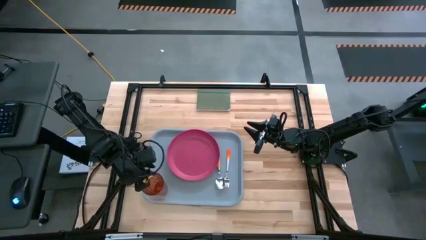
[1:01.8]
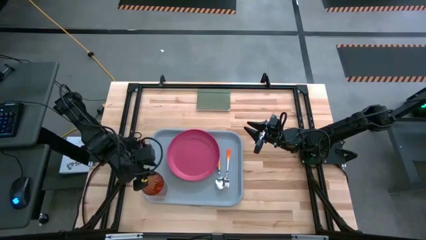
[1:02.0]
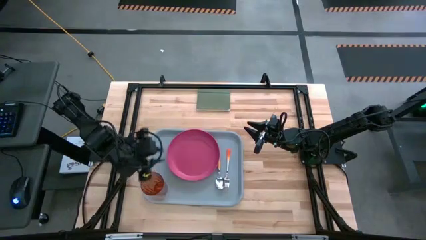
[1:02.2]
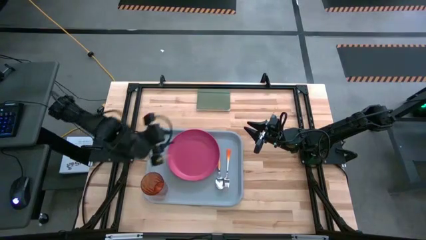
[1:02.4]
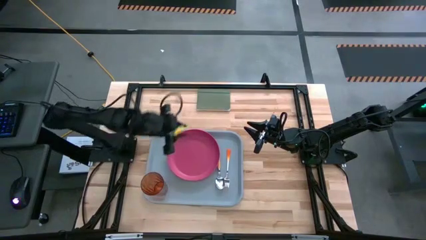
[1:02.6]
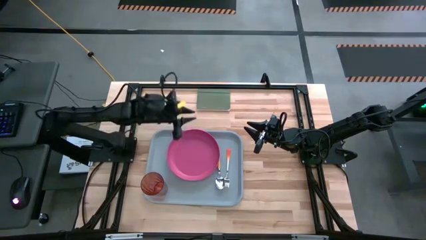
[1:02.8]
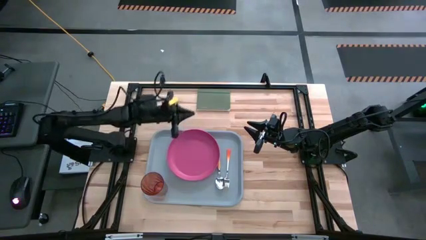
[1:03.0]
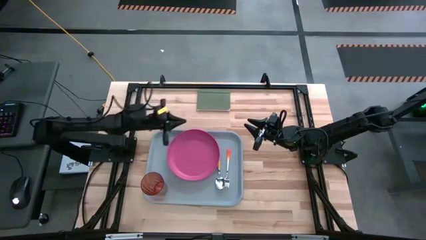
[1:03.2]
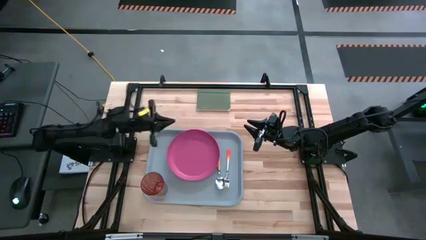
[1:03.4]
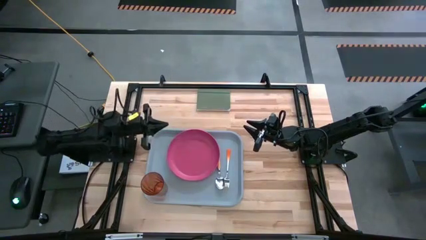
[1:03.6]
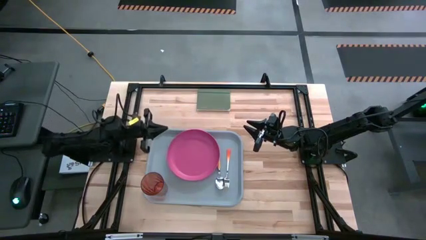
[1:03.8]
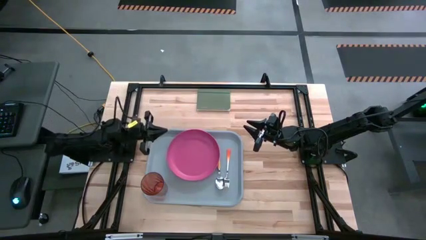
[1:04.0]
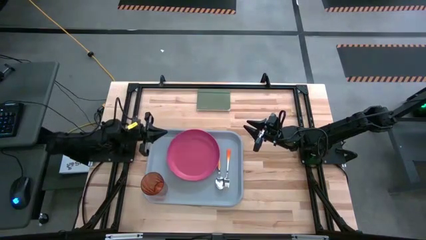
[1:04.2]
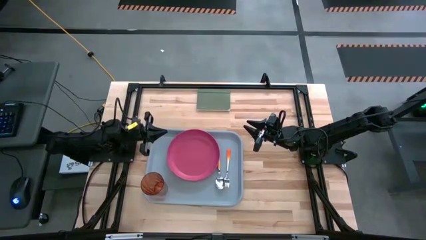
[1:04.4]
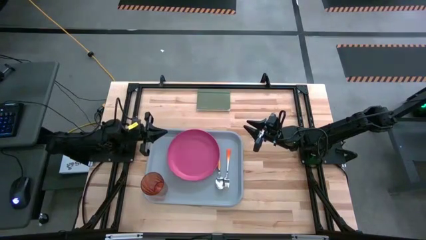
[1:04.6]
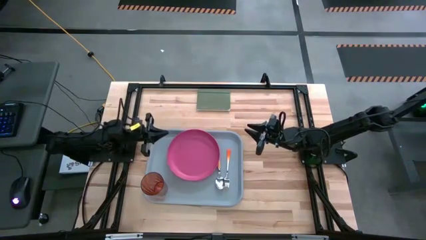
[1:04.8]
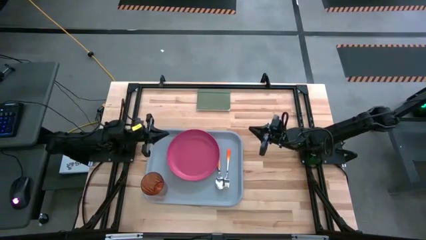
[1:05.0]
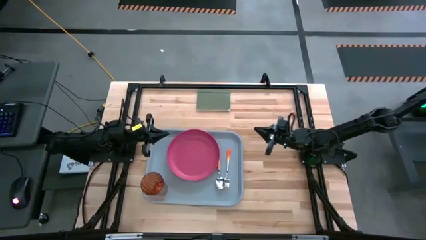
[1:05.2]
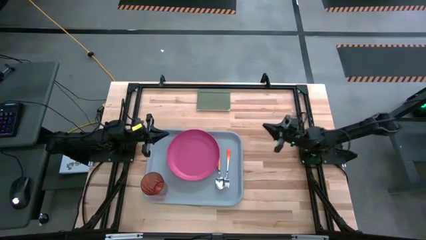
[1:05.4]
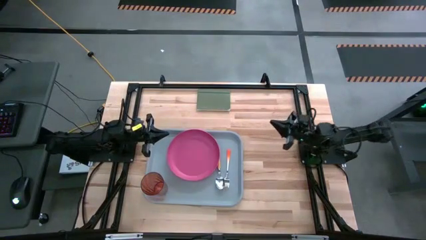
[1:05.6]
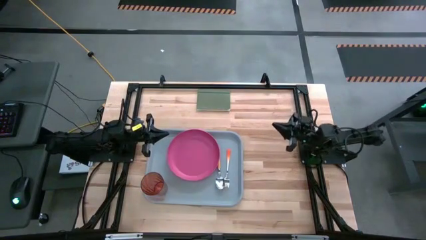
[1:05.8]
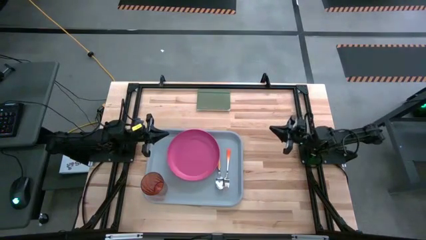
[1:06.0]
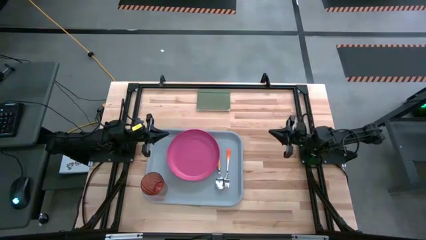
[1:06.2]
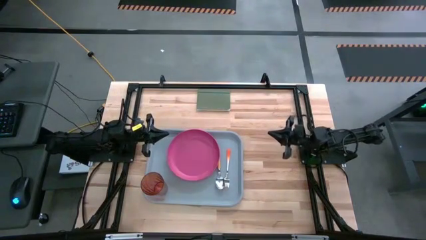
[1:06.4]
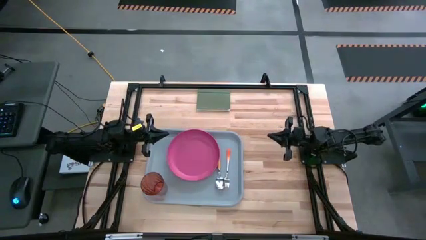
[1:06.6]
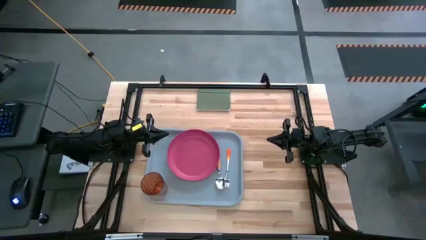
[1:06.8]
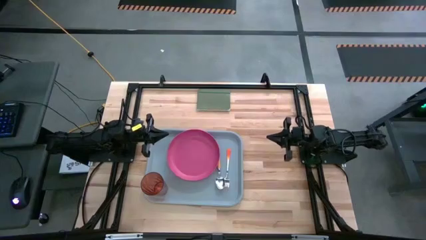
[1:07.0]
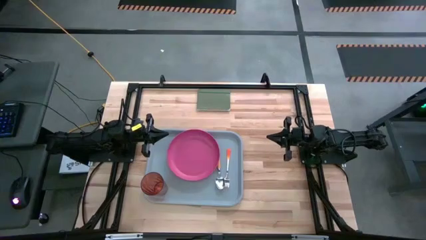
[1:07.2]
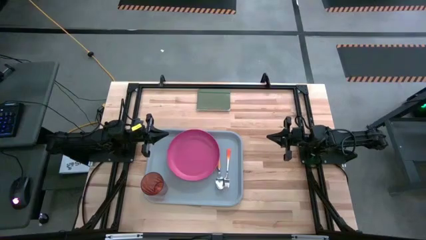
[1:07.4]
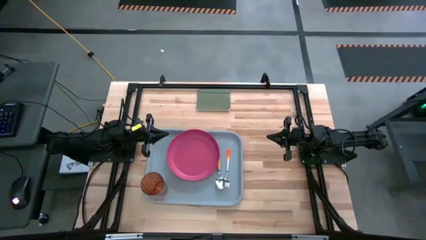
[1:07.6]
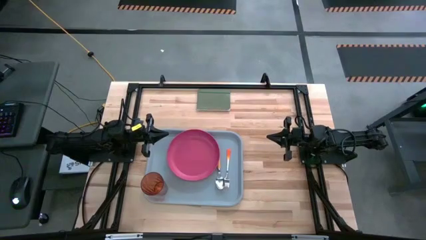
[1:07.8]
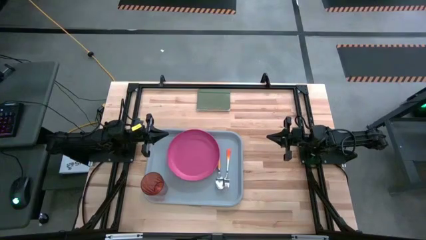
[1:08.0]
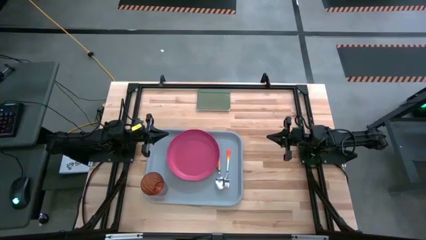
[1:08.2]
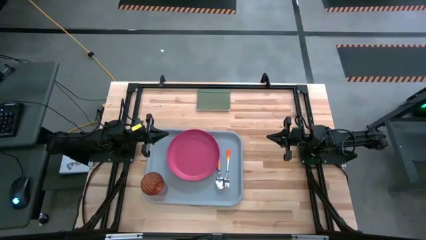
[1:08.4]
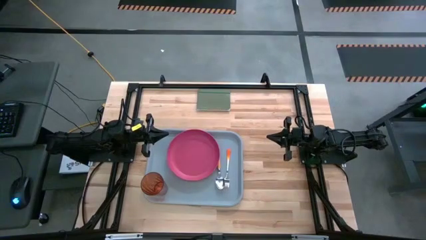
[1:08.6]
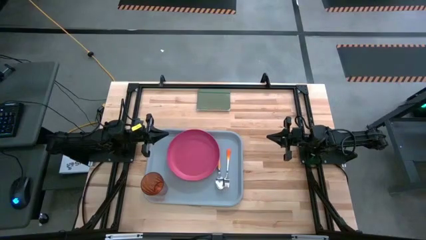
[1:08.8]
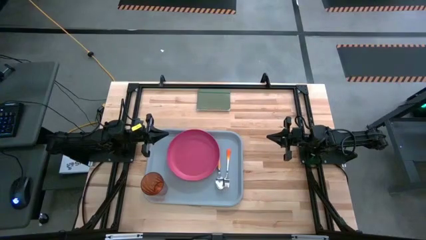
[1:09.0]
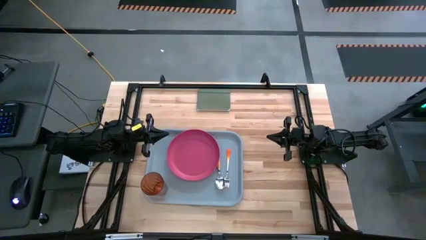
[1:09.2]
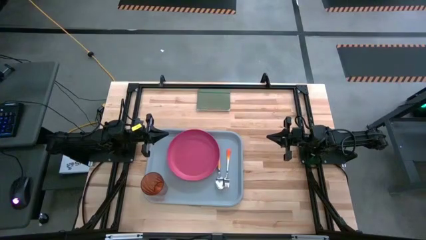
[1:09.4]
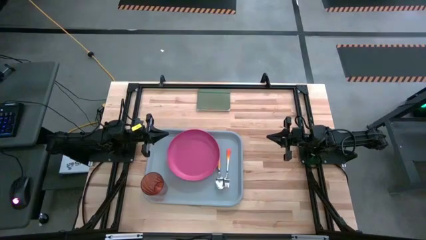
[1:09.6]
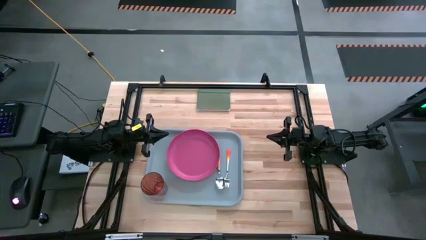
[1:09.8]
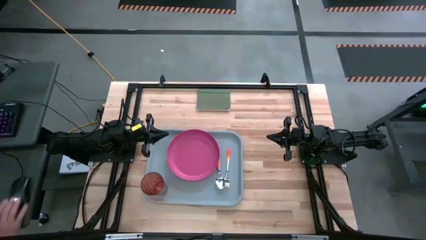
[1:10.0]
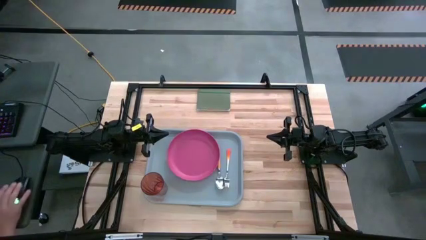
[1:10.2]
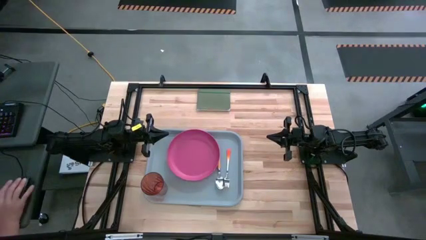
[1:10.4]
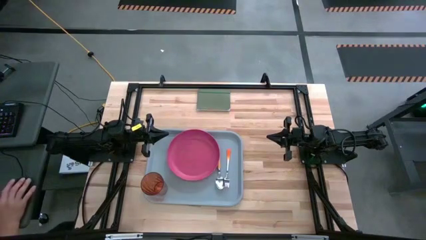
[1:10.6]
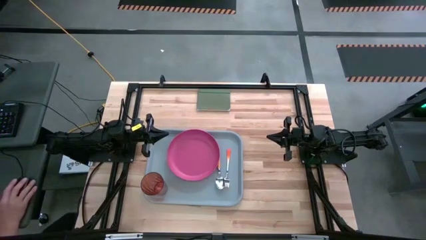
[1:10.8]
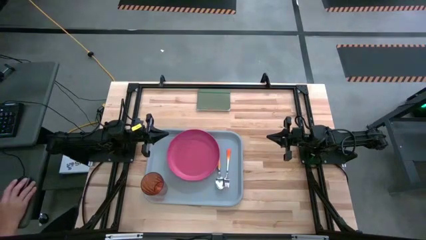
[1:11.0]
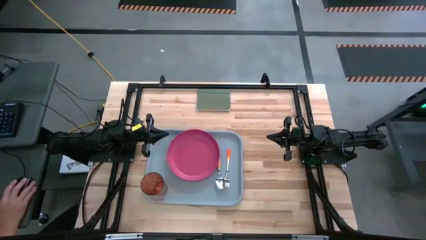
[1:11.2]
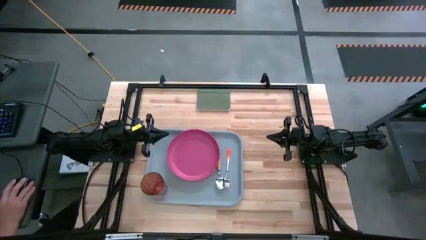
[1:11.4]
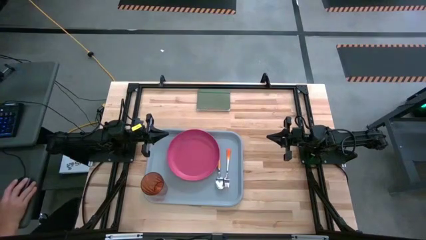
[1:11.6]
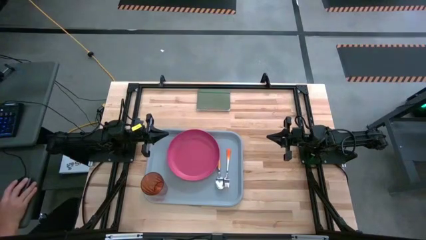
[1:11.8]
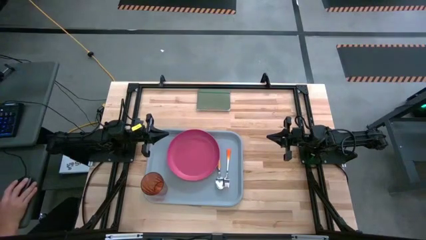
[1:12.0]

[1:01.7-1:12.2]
Task: Pick and place plate/cup/fork/spoon on tray
Return to Home Position
